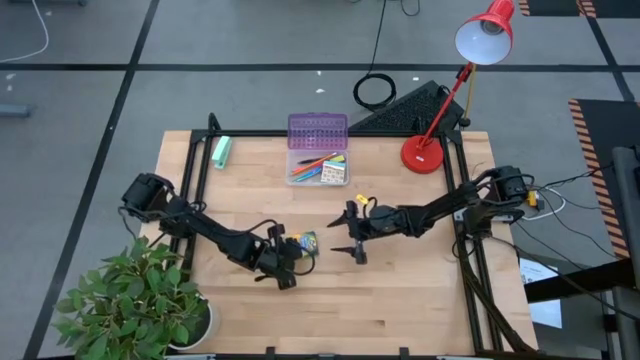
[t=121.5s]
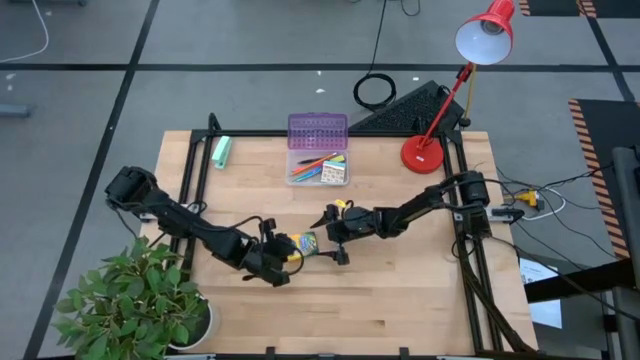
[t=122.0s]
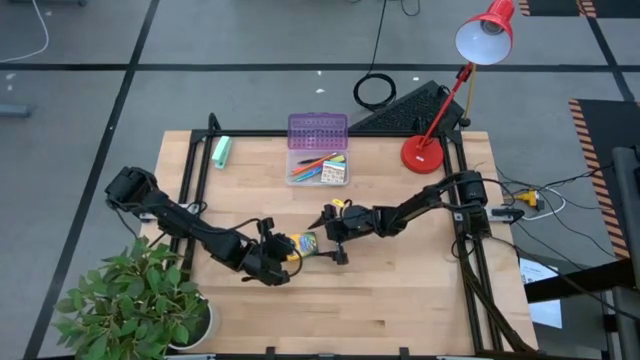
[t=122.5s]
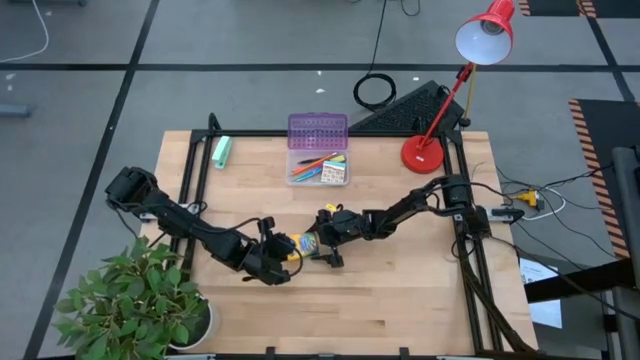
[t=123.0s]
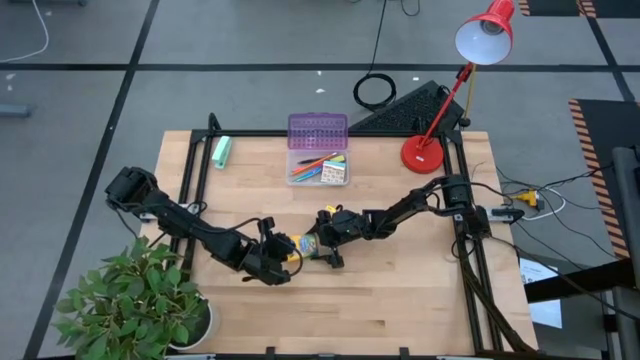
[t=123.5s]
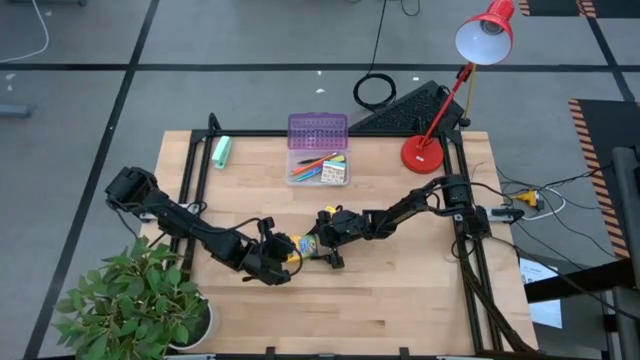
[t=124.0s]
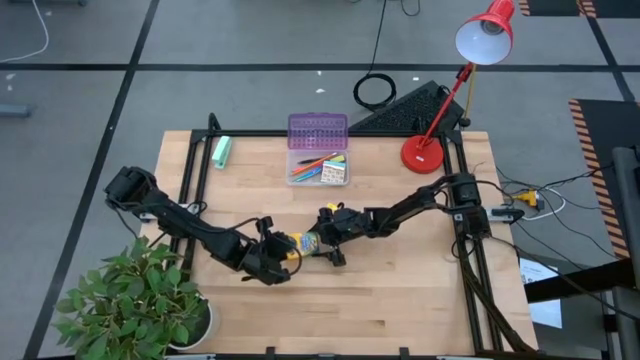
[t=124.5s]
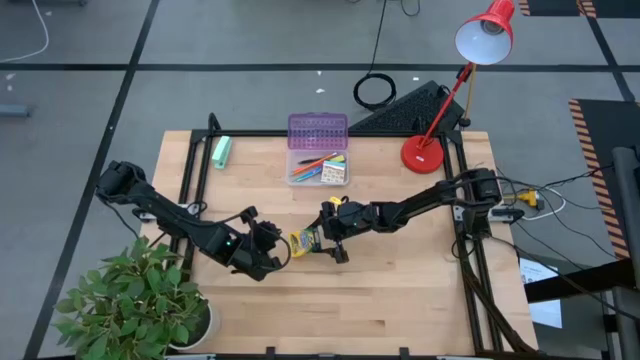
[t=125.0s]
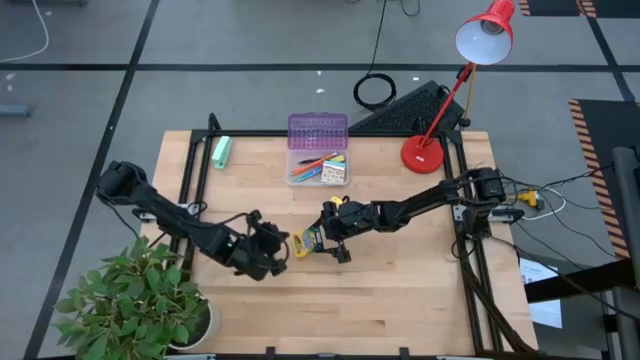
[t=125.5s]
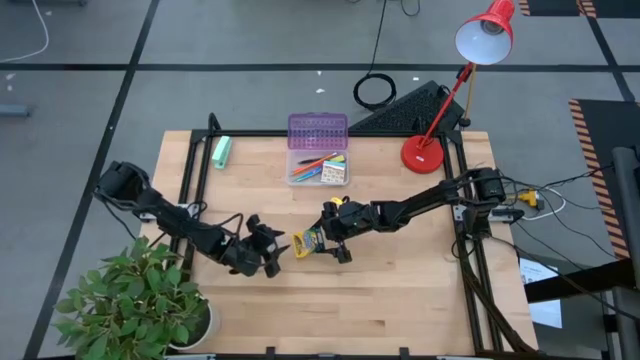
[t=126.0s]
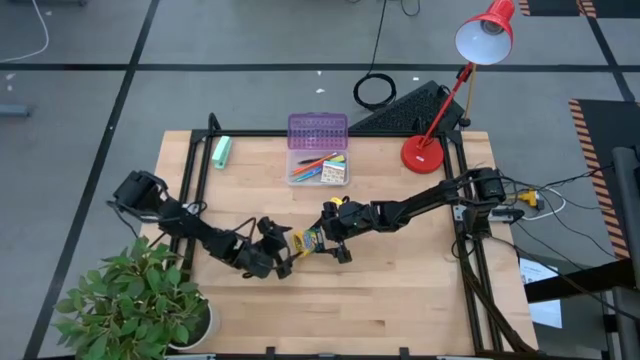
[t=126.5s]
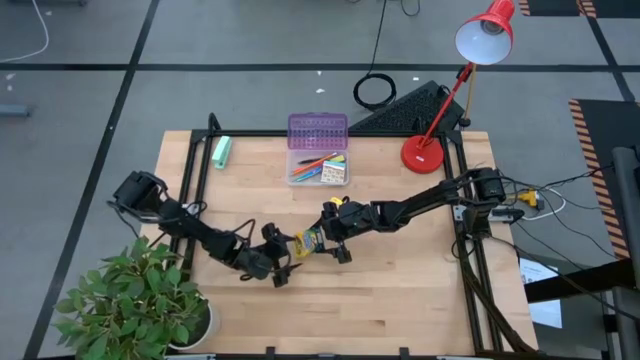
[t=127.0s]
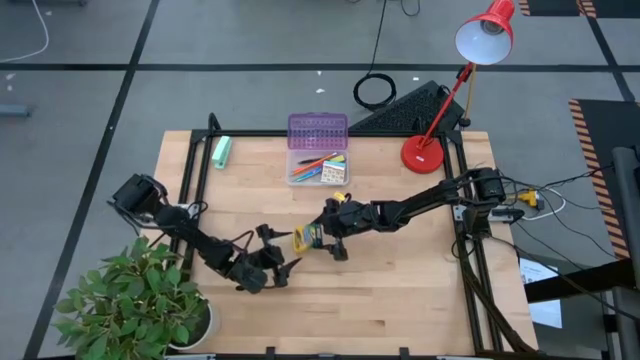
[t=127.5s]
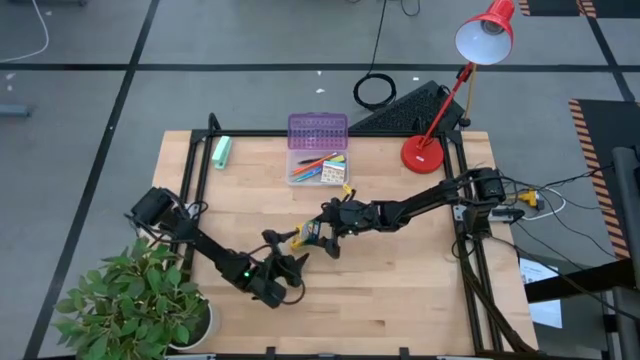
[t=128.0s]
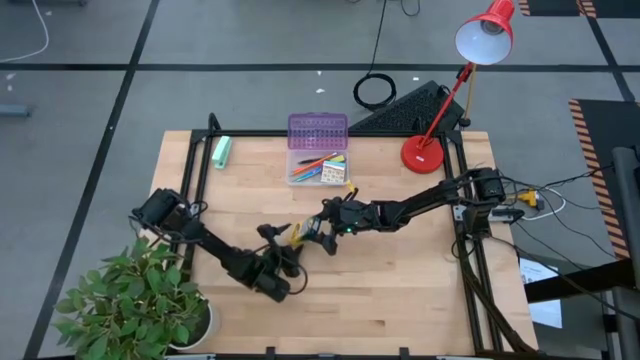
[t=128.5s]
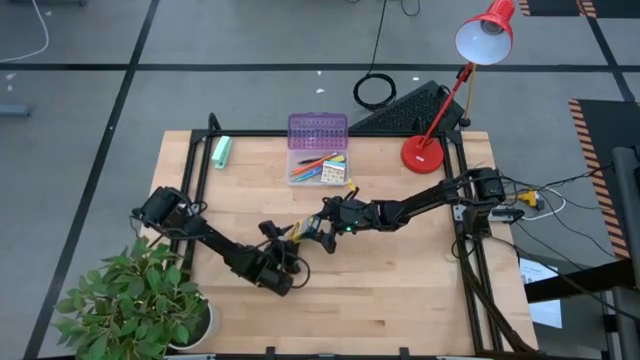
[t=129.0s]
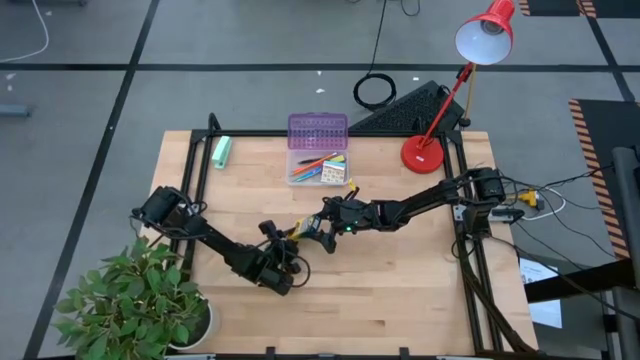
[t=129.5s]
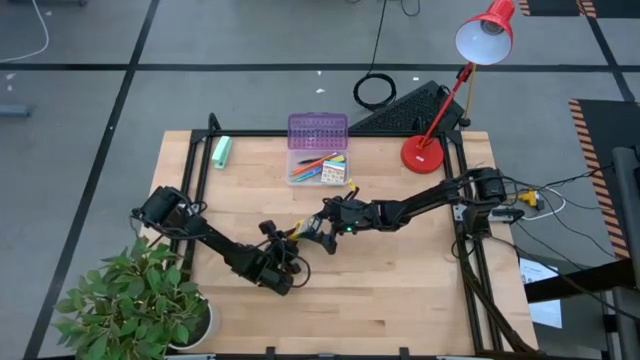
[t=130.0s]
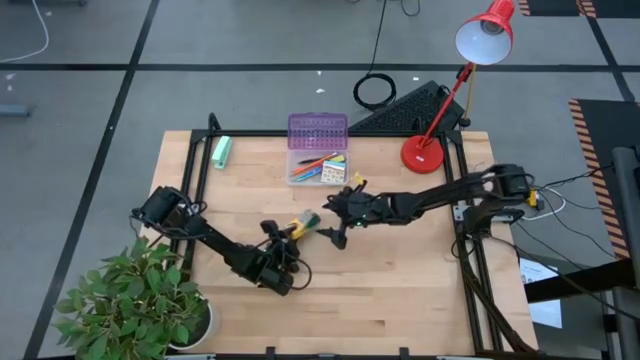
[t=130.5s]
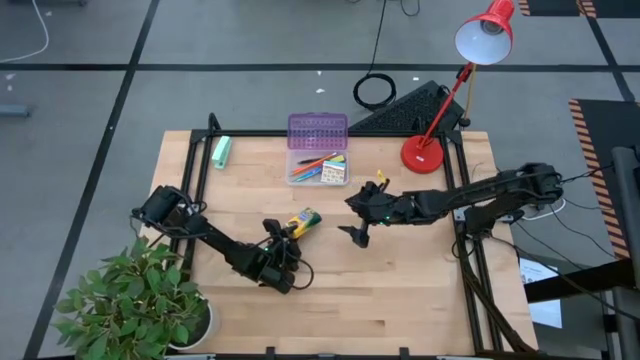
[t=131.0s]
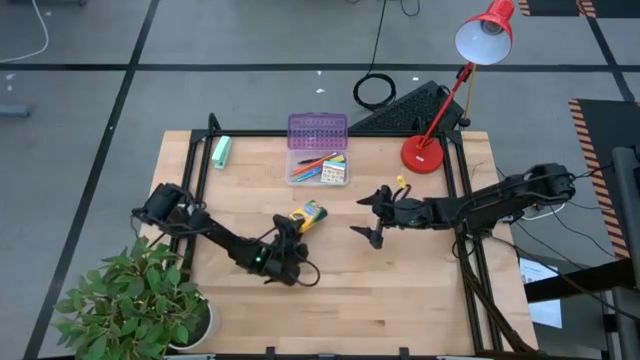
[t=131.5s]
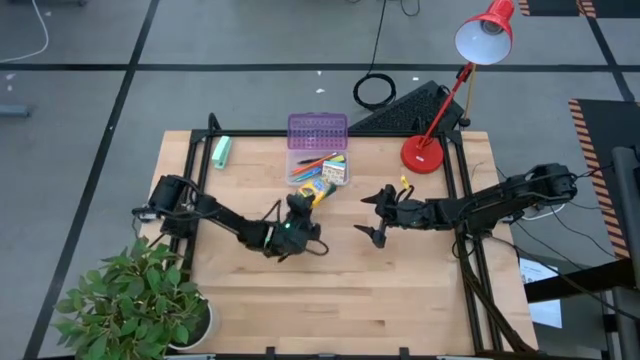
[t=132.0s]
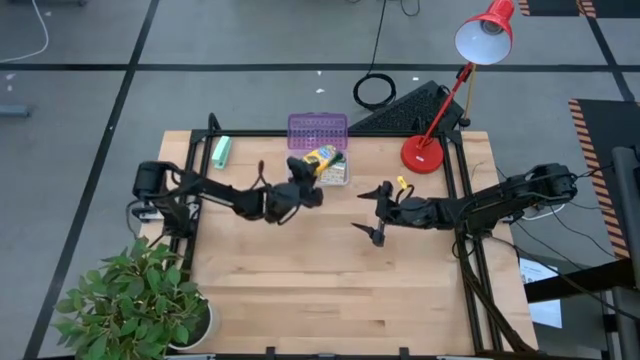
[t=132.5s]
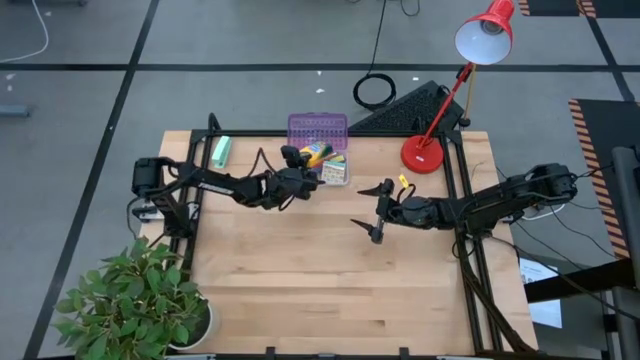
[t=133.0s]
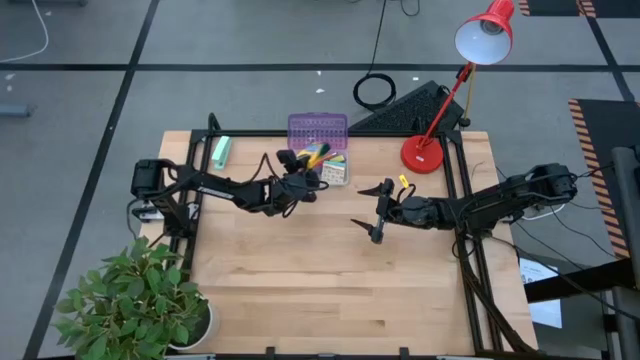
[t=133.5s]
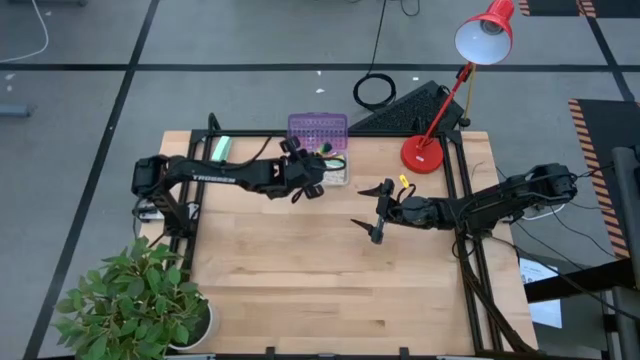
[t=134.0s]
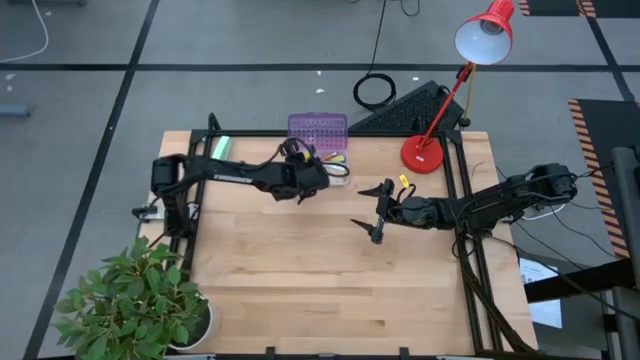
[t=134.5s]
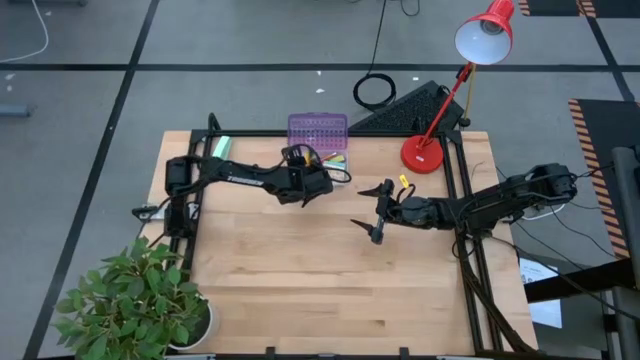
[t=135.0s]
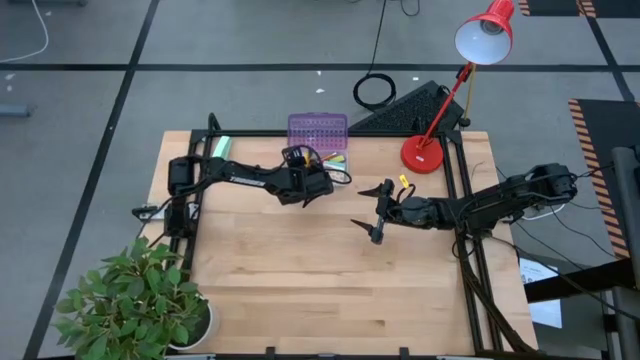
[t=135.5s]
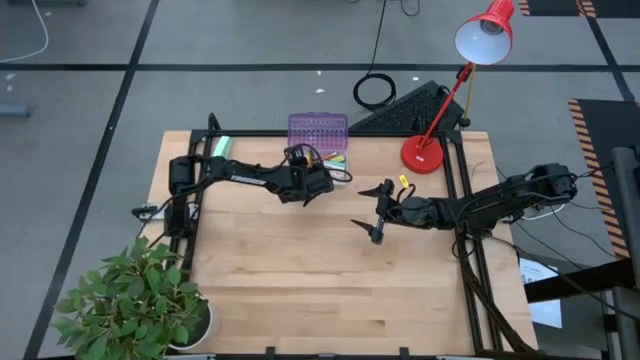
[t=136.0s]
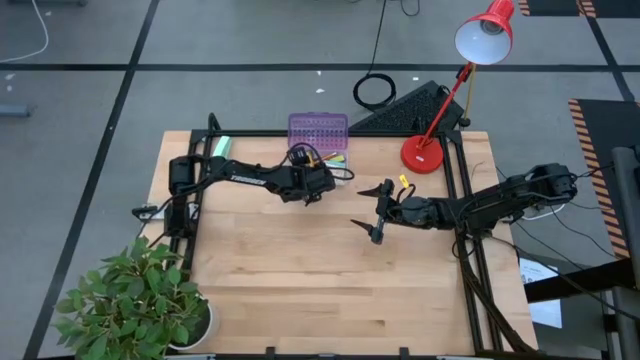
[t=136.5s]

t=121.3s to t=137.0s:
Task: Pack school essentials
Put the yellow crayon box into the purple supply box

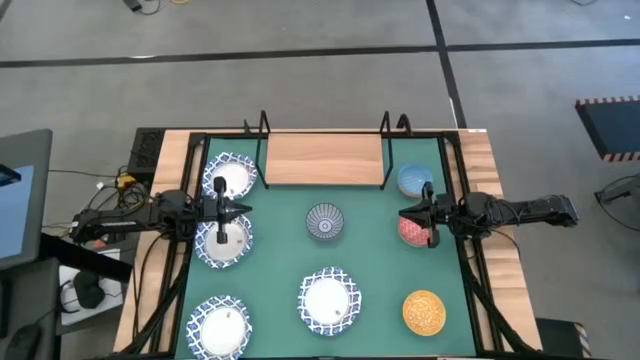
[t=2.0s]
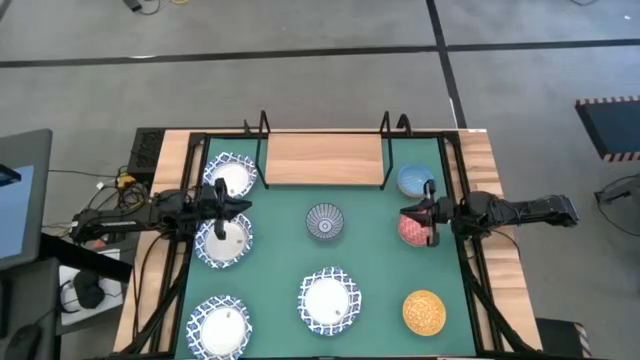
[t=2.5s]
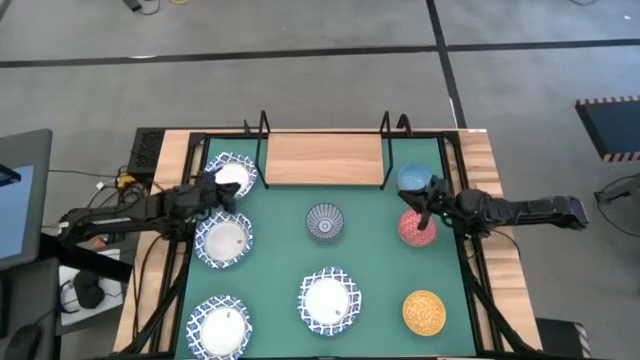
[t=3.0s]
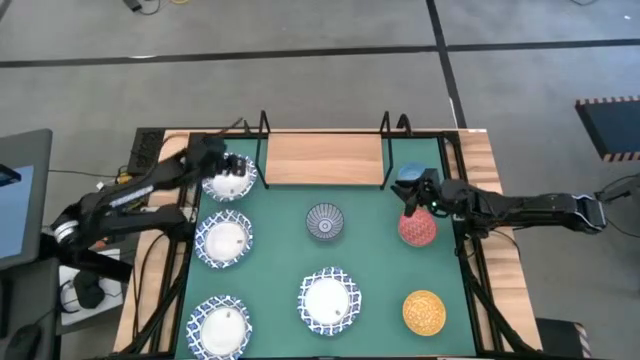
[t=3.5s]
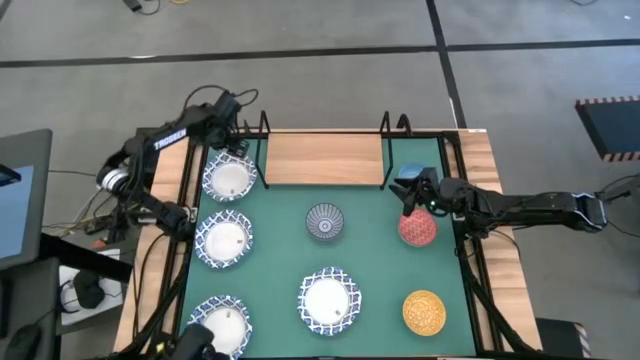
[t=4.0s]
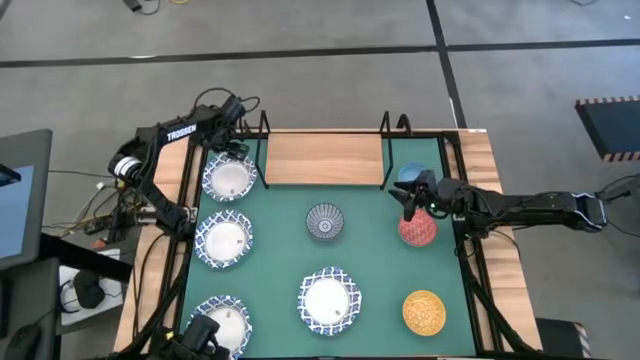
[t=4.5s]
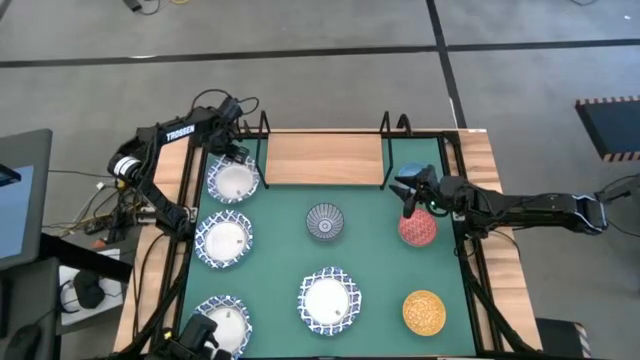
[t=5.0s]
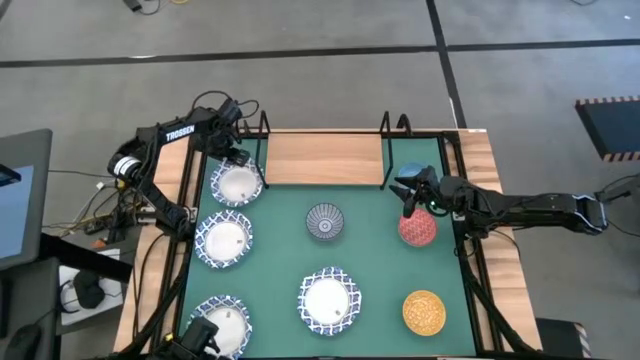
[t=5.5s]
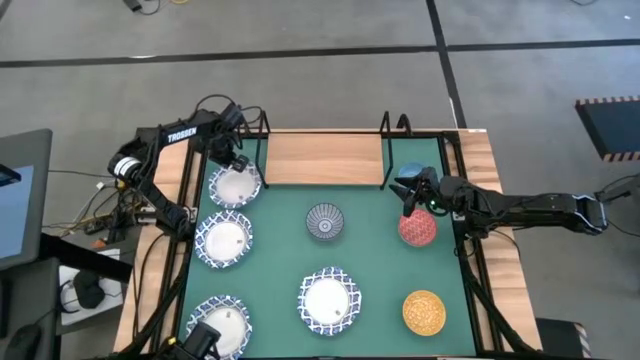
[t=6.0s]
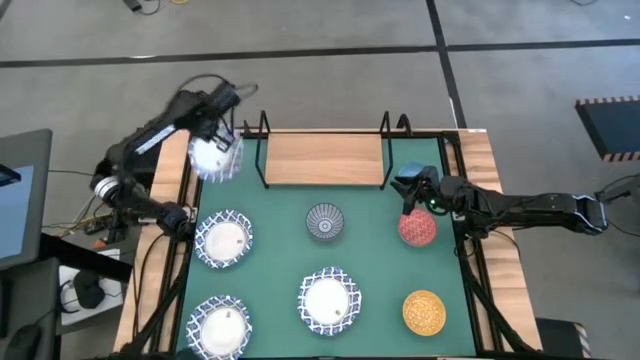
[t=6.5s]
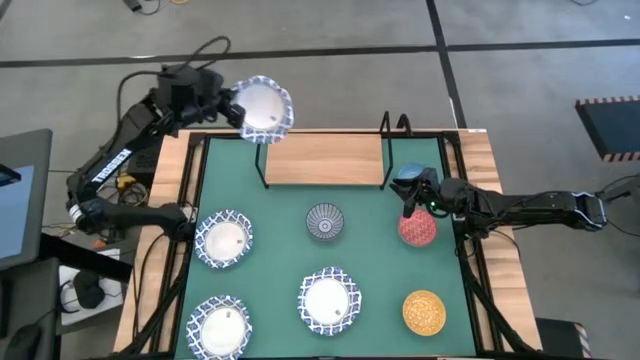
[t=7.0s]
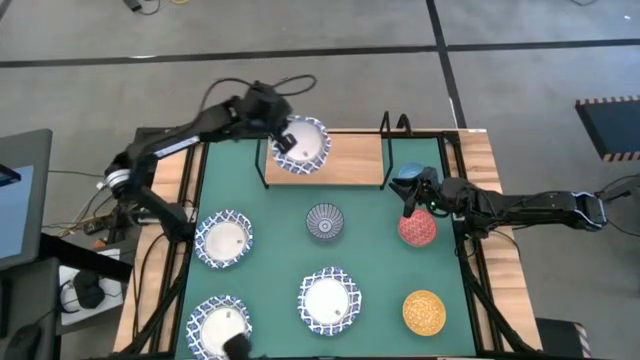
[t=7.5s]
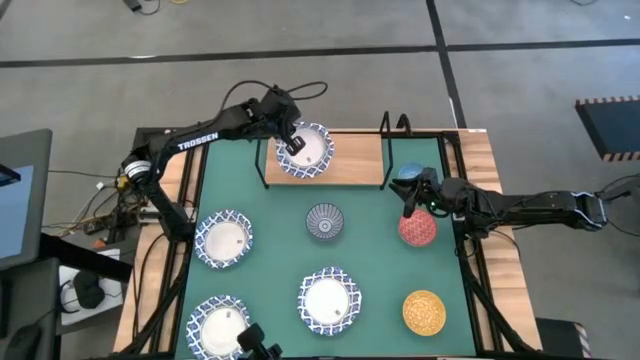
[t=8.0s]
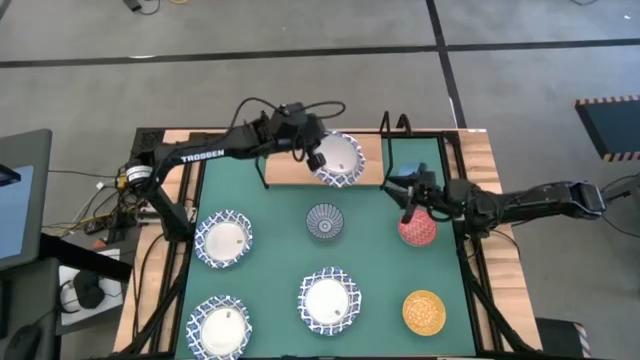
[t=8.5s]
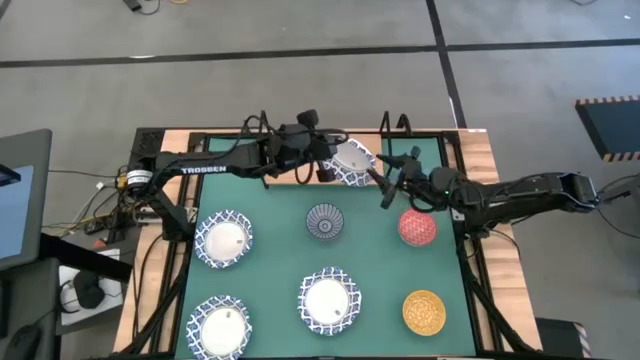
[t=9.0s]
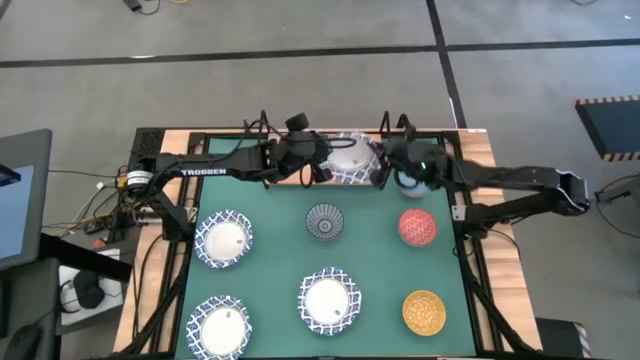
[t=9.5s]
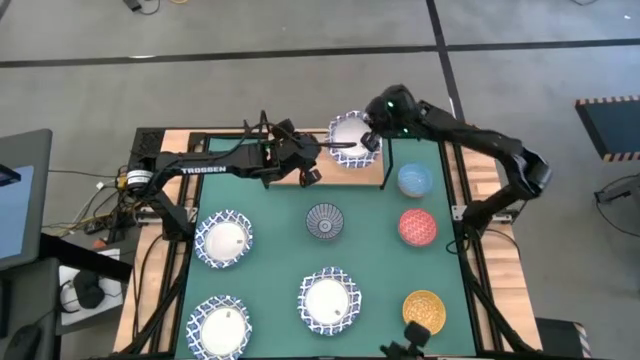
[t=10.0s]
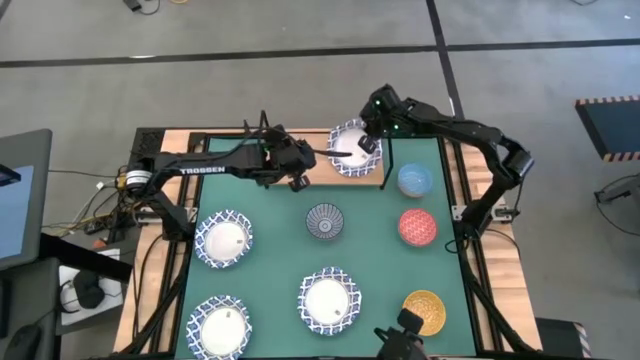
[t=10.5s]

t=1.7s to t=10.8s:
Task: Place and stack bowls onto a shelf
Put the white bowl on the shelf
